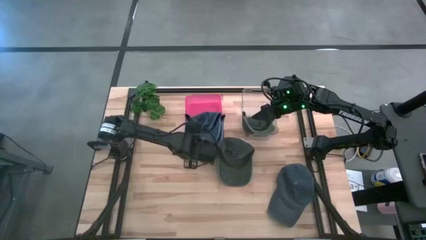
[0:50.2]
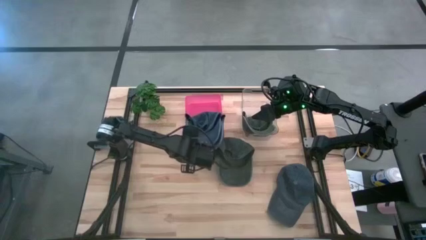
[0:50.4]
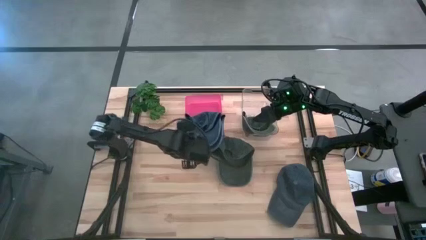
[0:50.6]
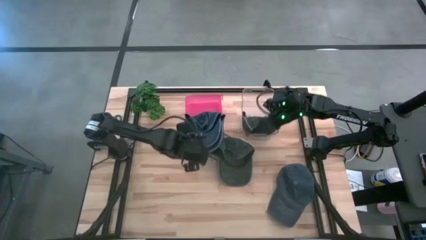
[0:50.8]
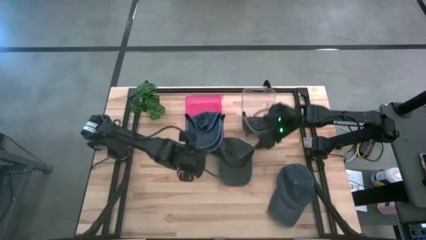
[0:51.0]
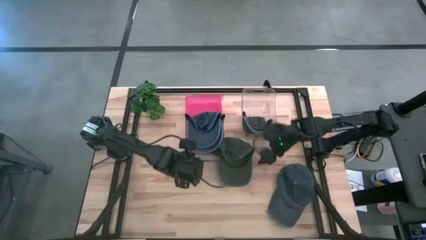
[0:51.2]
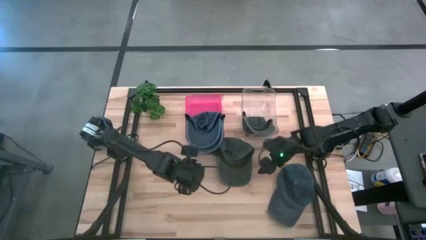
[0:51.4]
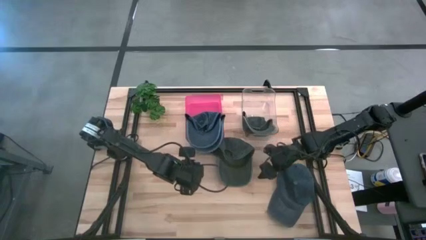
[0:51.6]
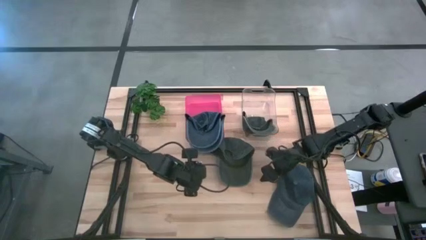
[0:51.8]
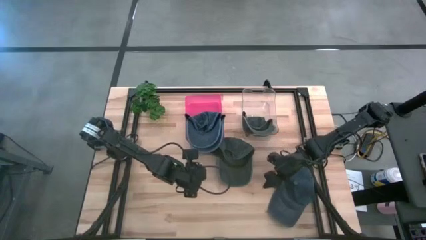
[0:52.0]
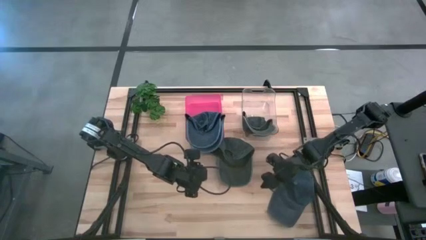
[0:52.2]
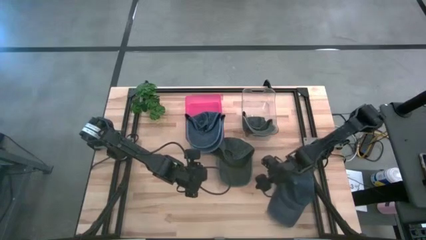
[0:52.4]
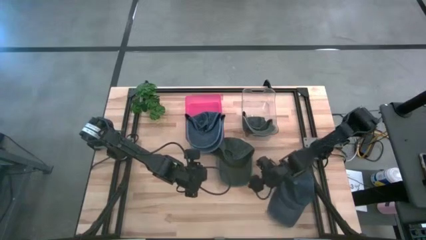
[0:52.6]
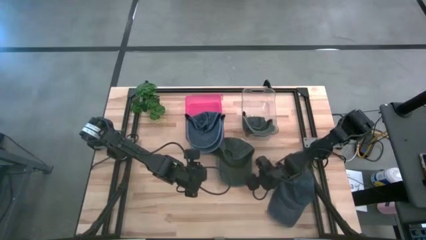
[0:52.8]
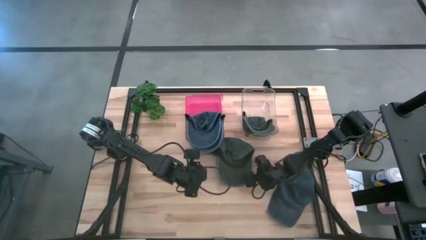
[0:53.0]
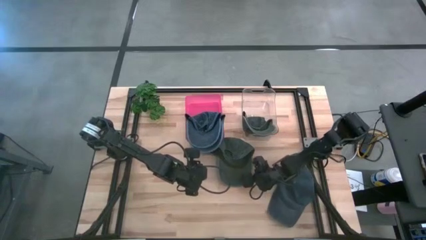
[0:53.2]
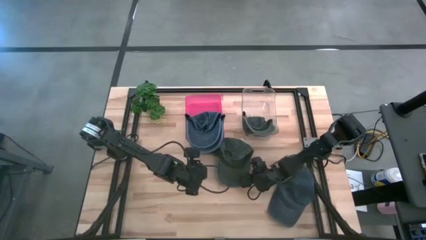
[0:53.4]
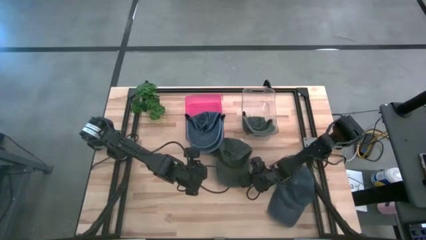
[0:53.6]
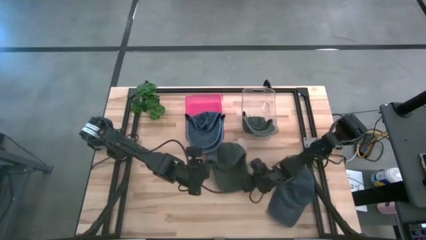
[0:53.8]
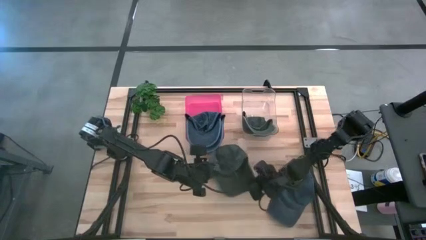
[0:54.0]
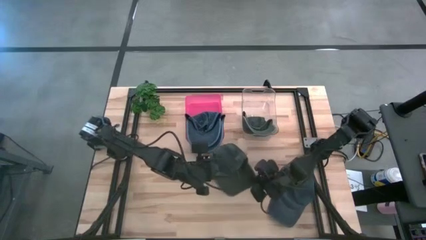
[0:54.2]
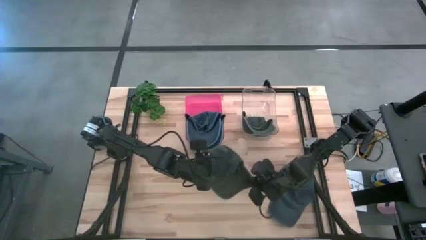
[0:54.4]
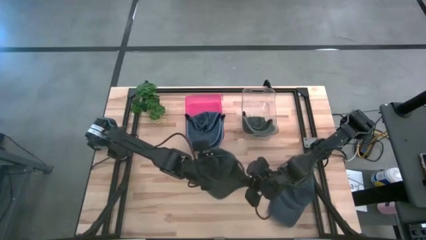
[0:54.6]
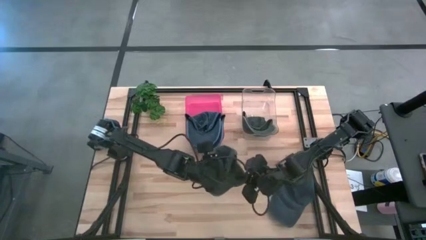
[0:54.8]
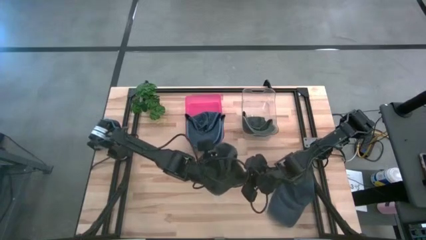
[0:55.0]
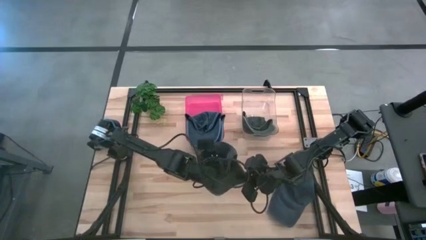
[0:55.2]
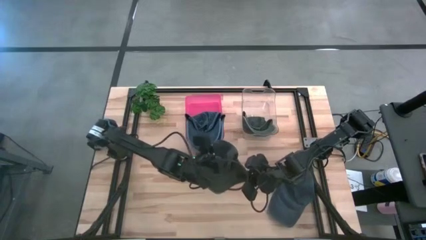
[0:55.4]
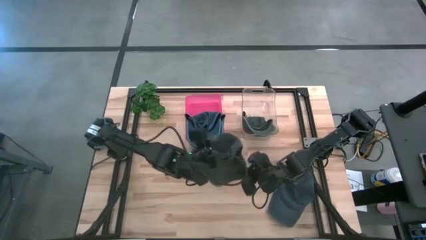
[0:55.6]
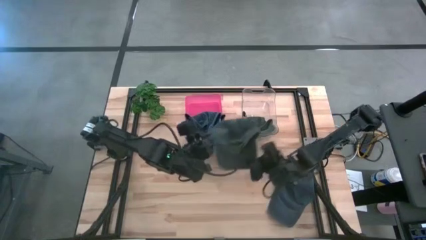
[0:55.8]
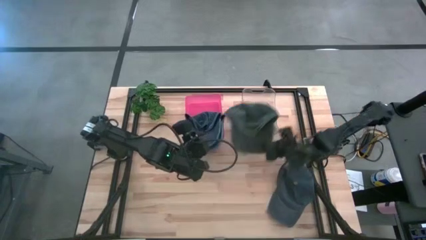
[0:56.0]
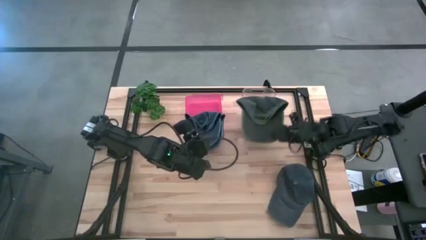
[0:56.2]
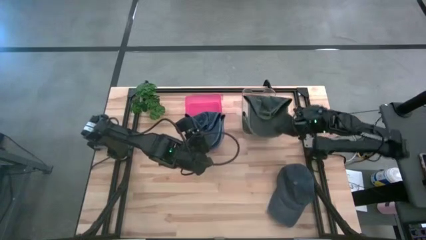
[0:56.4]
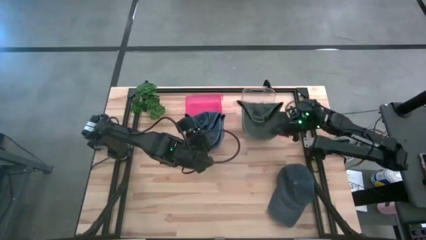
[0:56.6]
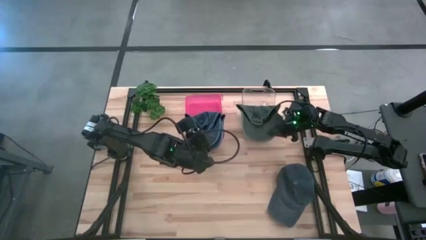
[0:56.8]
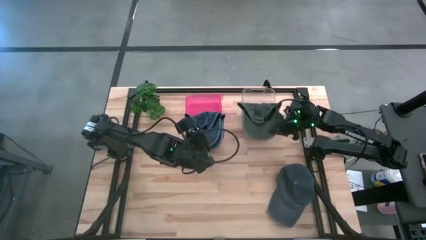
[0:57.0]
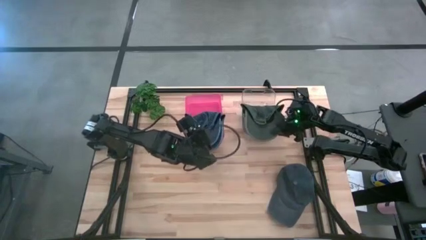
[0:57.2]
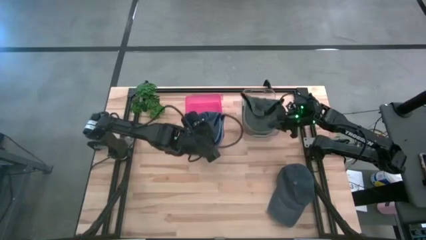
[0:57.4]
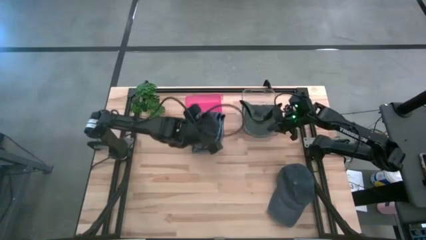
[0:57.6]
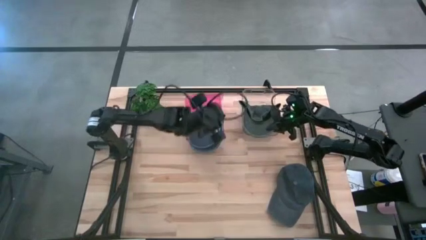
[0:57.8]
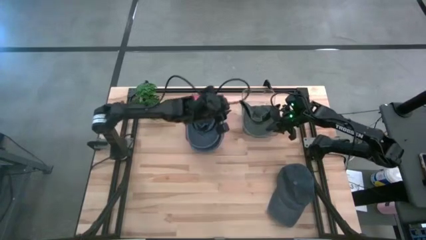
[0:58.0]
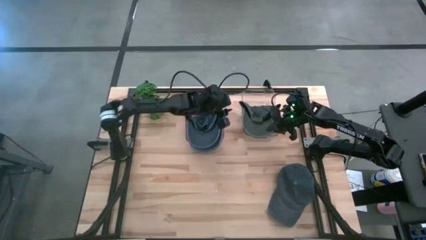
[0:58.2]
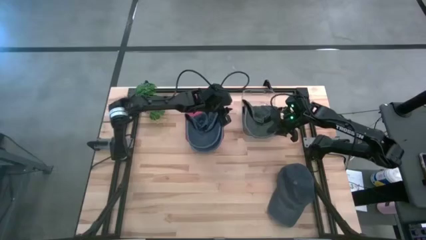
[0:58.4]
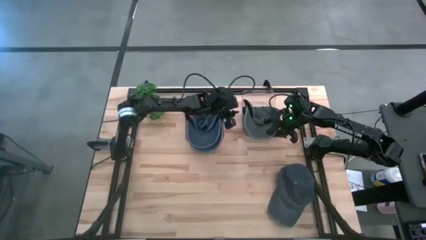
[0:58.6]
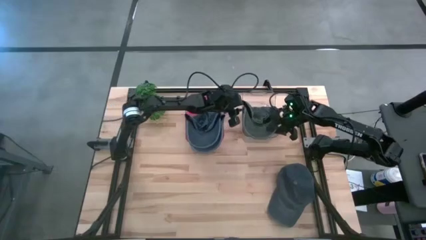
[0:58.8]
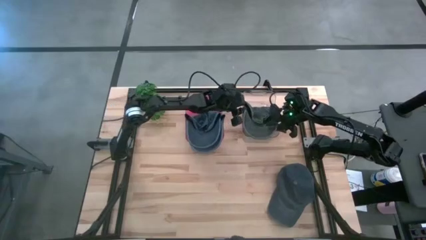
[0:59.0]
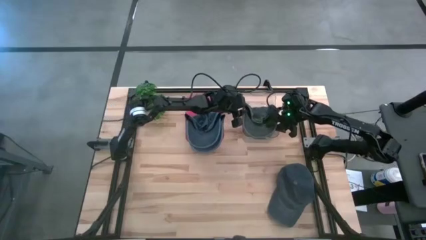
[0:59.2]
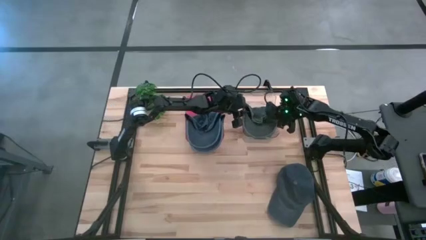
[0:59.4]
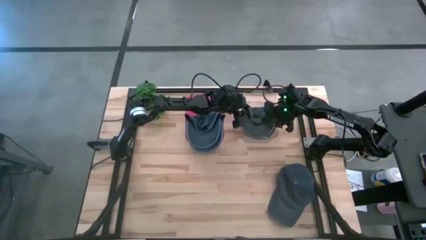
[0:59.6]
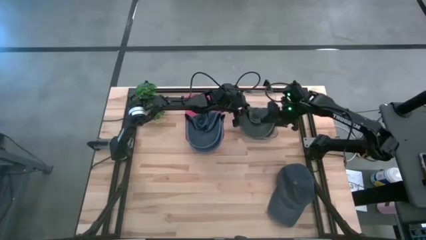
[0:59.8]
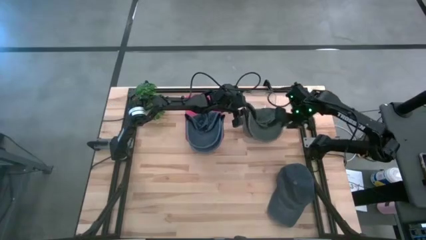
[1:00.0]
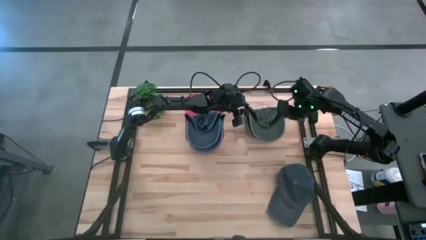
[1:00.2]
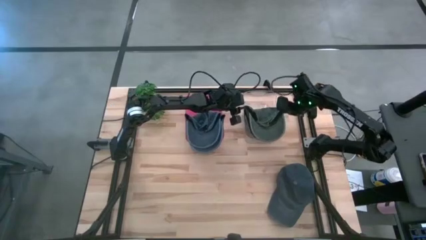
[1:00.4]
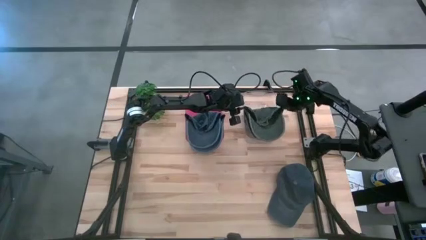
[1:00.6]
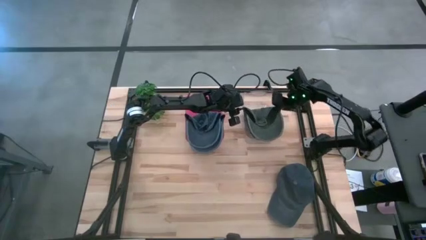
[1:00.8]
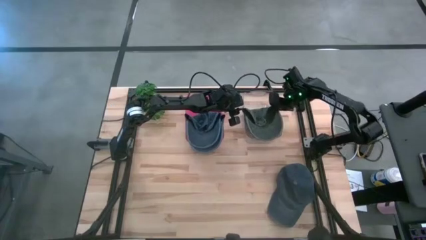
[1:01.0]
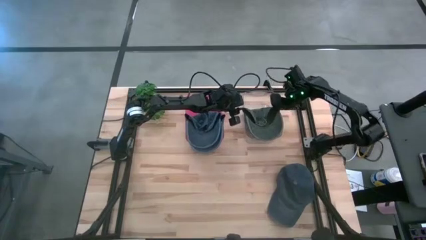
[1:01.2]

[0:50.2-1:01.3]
Task: Pick & Place hat
Put the black cap into the transparent bin

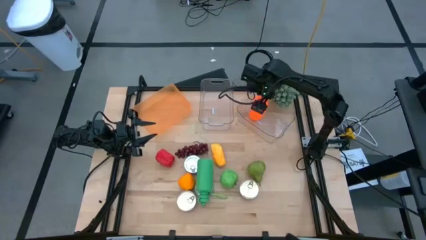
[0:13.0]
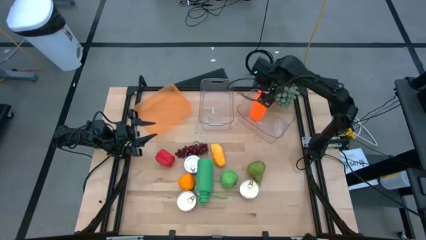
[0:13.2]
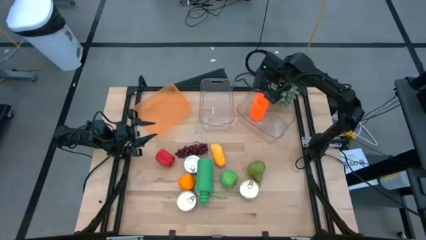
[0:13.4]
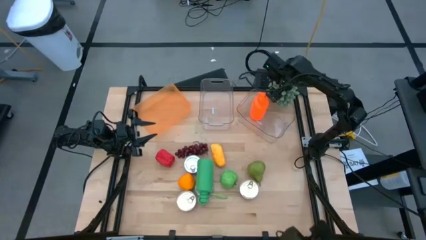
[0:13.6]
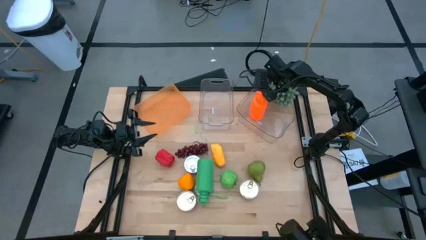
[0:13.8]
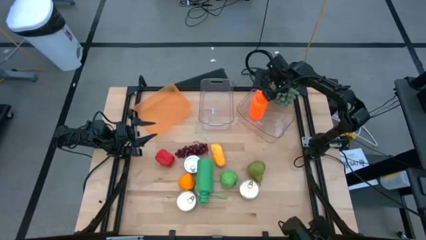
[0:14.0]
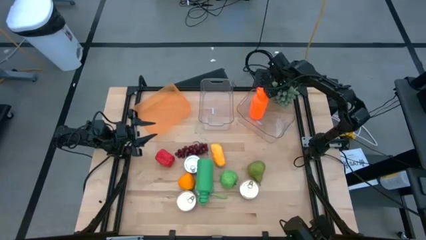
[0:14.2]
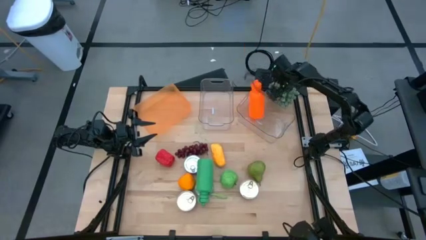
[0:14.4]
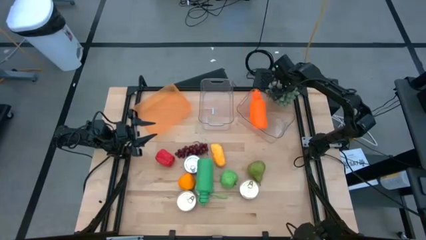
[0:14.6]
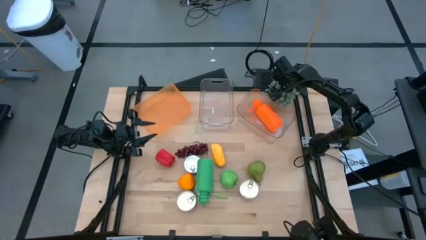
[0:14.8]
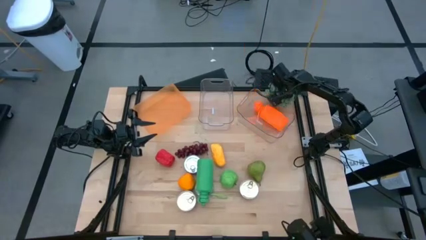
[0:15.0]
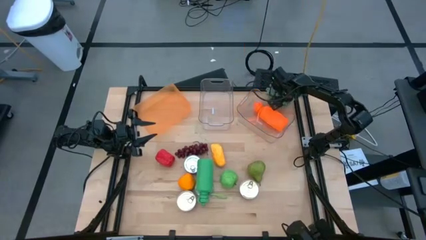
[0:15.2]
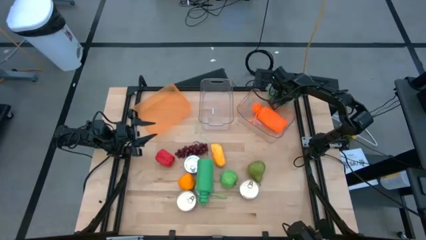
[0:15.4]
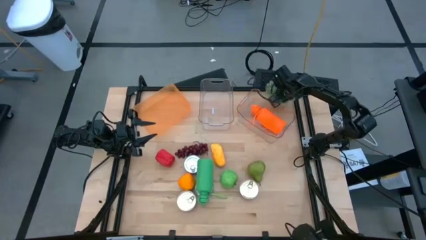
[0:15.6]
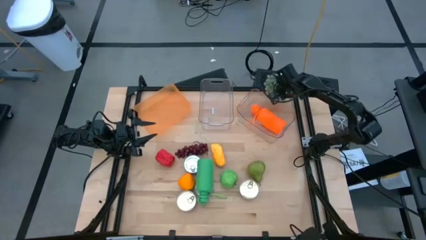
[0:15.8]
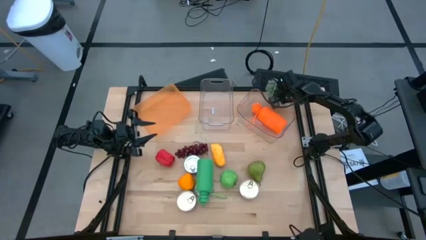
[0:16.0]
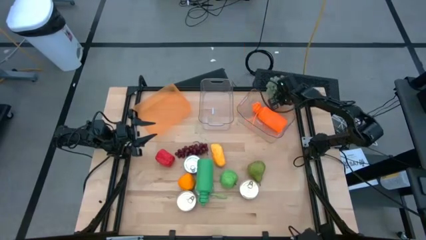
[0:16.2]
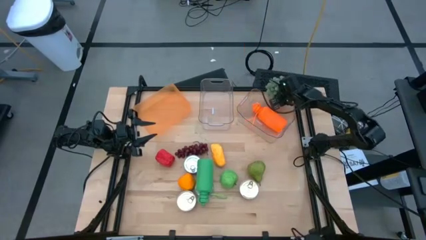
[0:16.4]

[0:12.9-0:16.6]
Task: Pick & Place Food Item
Adjust the plant
